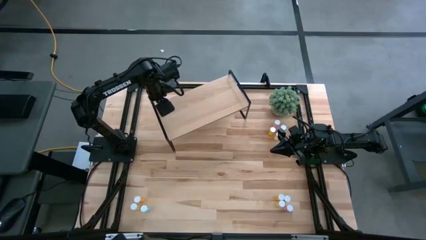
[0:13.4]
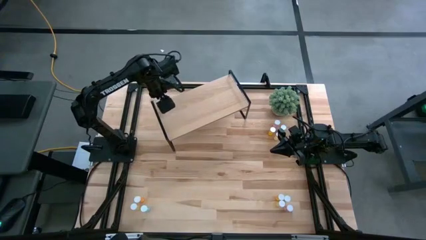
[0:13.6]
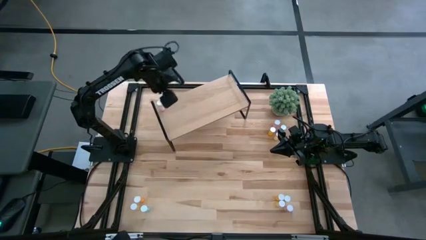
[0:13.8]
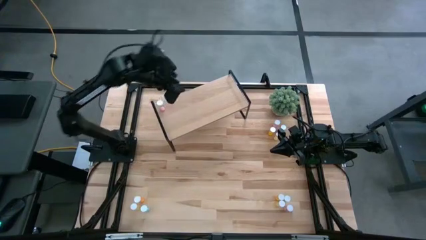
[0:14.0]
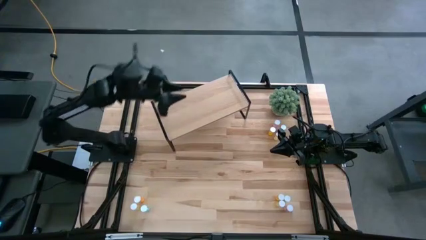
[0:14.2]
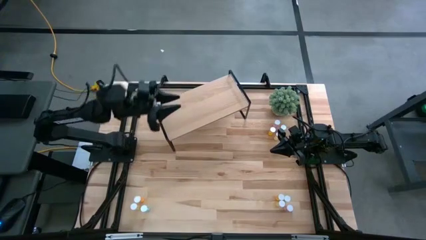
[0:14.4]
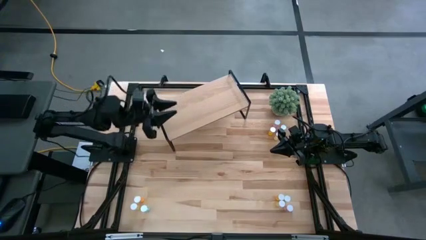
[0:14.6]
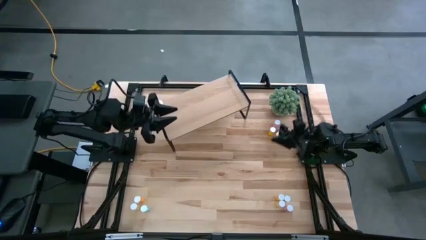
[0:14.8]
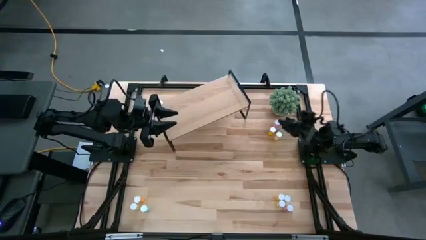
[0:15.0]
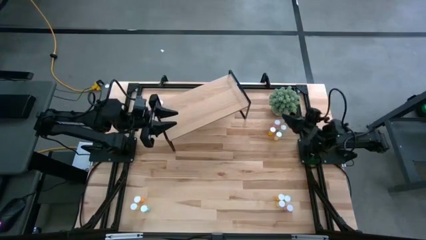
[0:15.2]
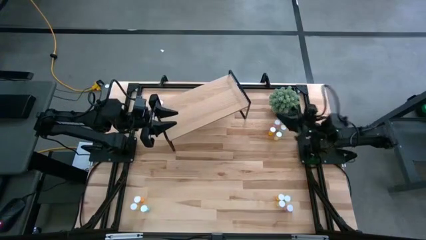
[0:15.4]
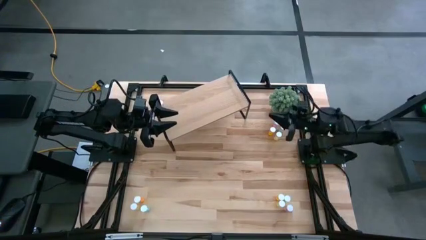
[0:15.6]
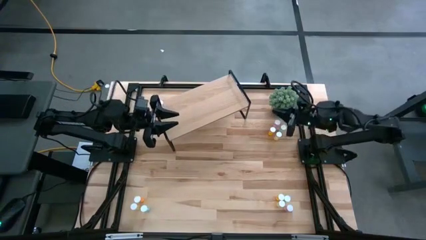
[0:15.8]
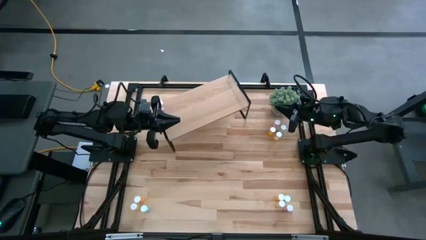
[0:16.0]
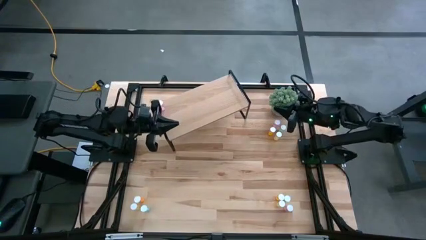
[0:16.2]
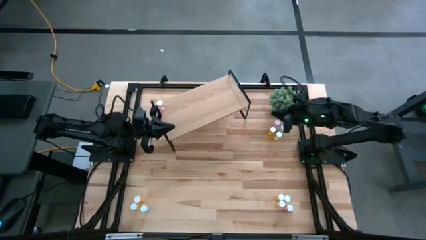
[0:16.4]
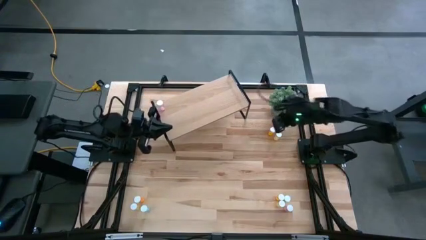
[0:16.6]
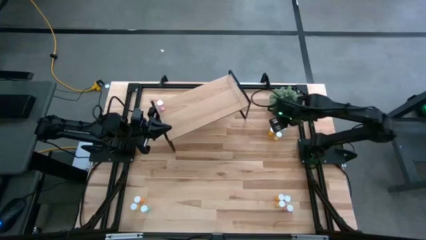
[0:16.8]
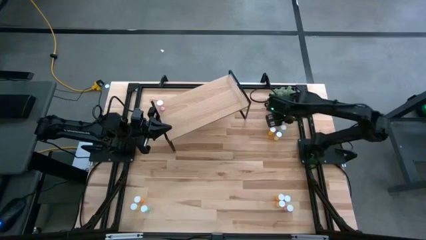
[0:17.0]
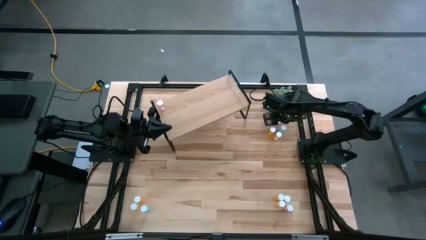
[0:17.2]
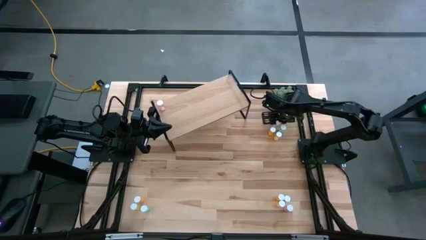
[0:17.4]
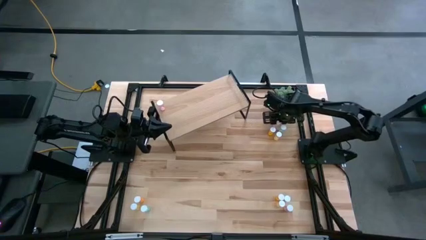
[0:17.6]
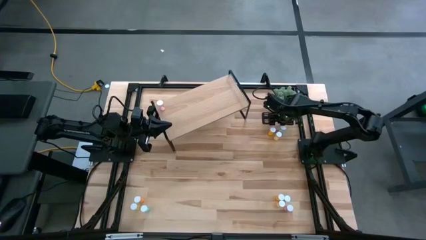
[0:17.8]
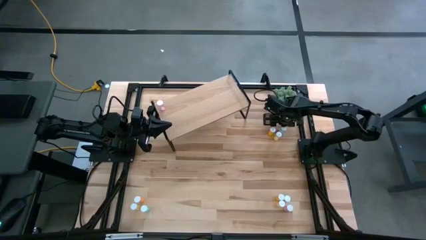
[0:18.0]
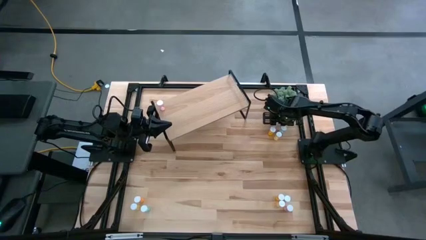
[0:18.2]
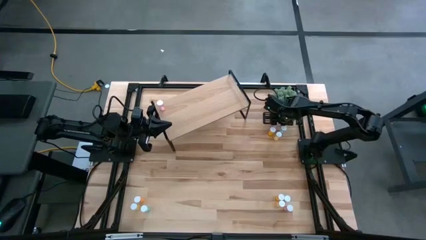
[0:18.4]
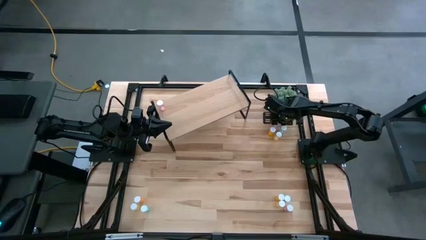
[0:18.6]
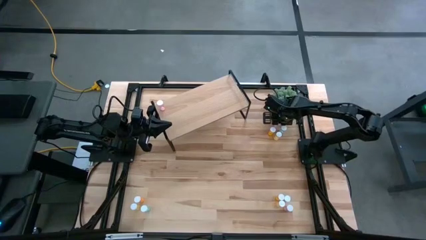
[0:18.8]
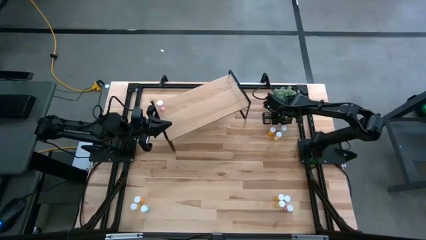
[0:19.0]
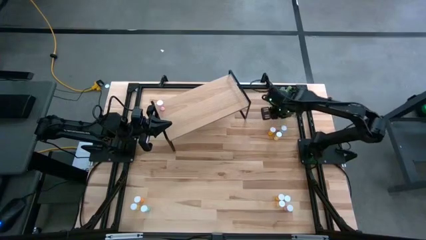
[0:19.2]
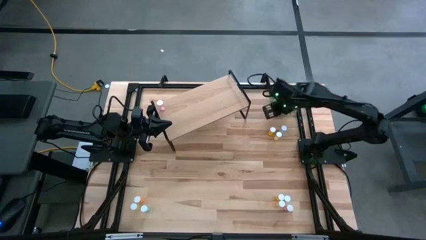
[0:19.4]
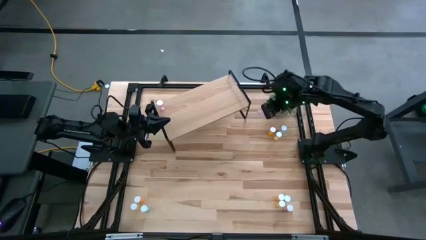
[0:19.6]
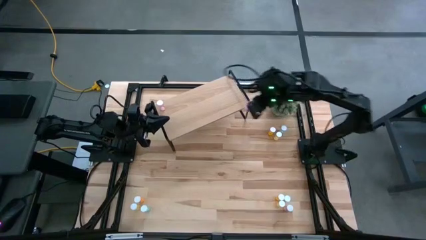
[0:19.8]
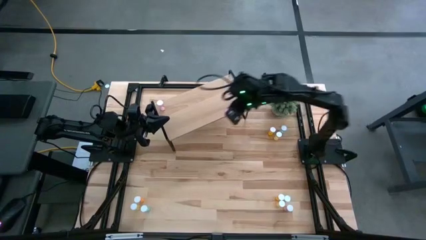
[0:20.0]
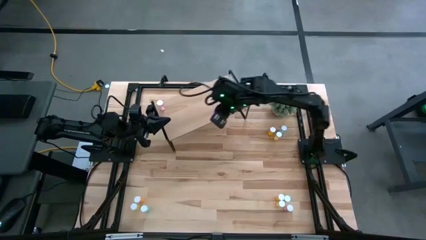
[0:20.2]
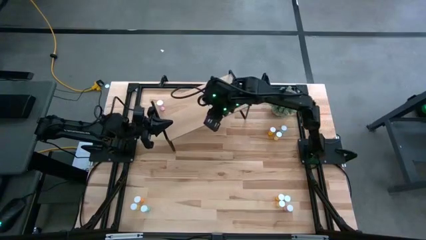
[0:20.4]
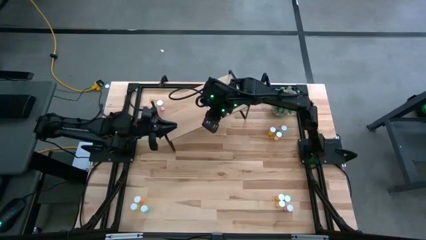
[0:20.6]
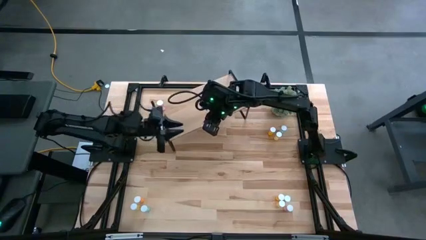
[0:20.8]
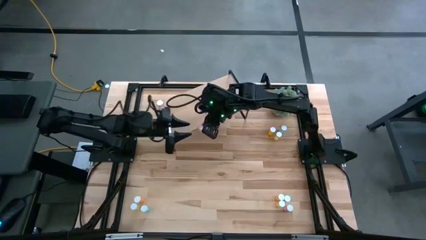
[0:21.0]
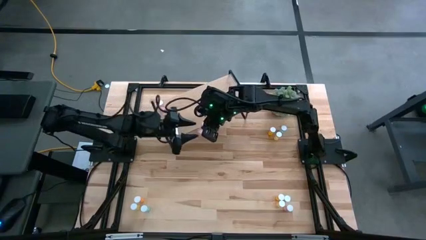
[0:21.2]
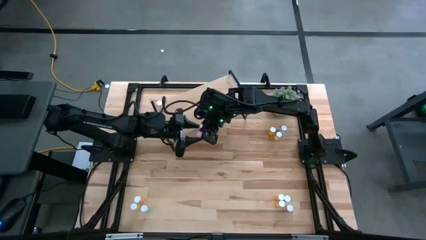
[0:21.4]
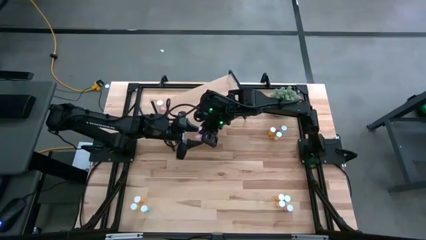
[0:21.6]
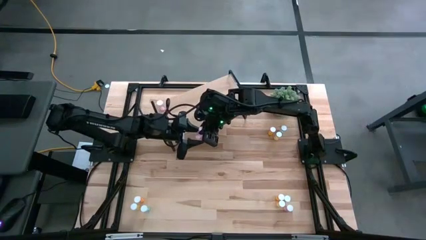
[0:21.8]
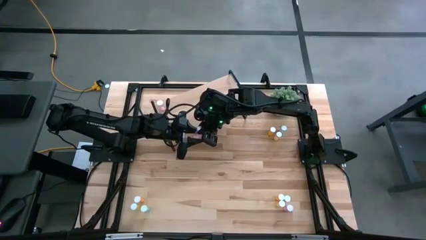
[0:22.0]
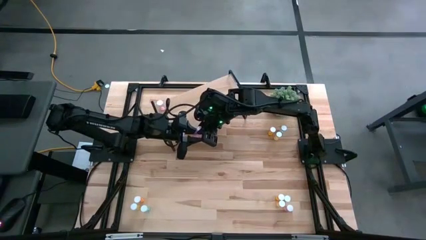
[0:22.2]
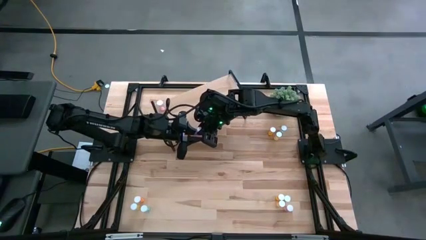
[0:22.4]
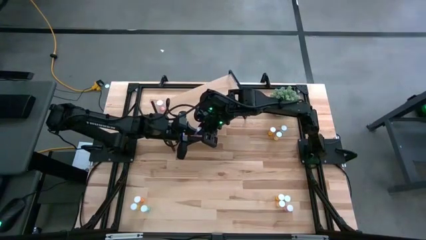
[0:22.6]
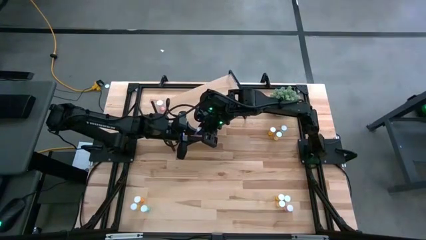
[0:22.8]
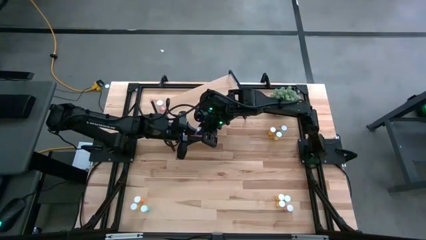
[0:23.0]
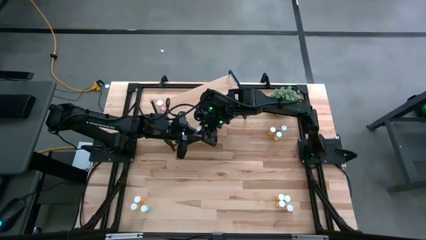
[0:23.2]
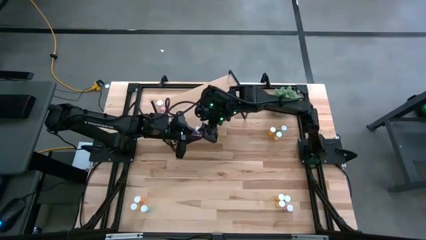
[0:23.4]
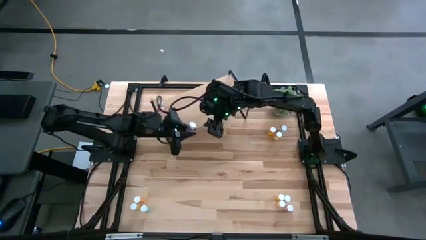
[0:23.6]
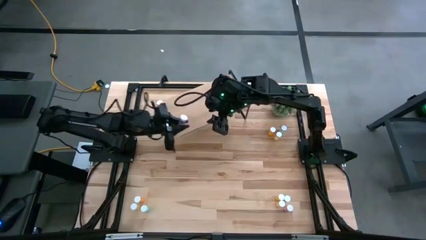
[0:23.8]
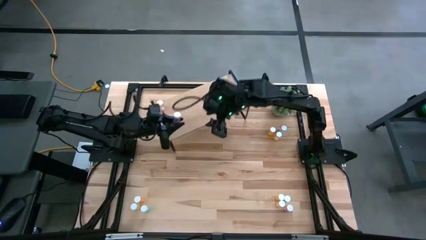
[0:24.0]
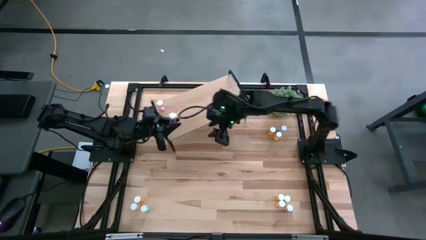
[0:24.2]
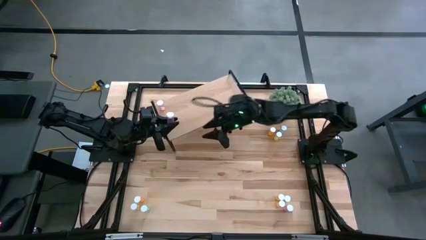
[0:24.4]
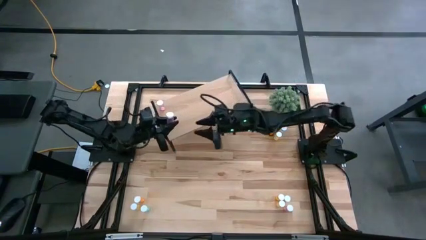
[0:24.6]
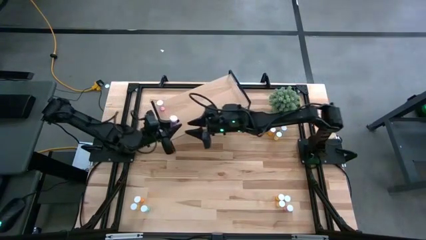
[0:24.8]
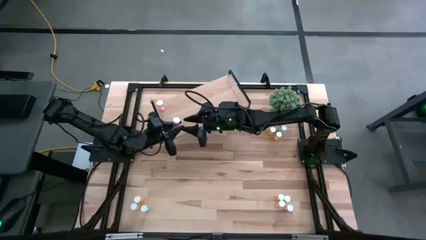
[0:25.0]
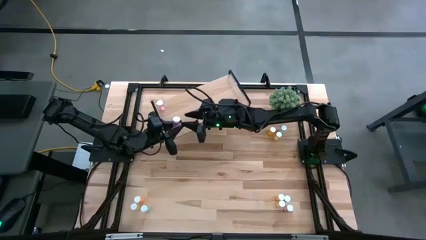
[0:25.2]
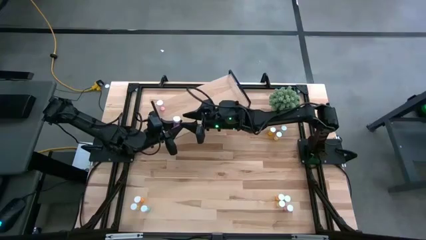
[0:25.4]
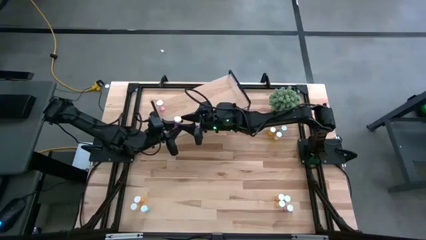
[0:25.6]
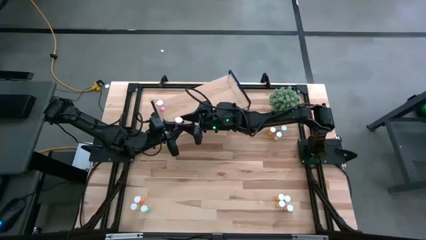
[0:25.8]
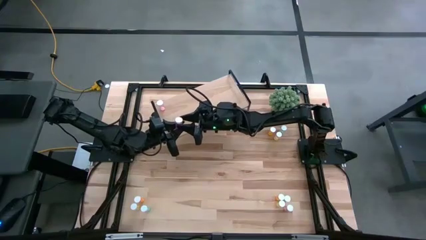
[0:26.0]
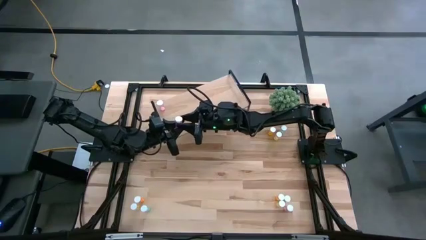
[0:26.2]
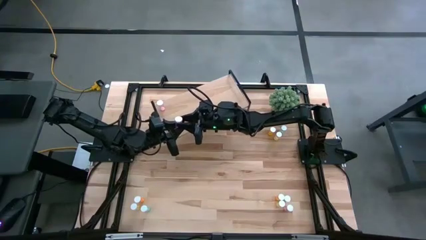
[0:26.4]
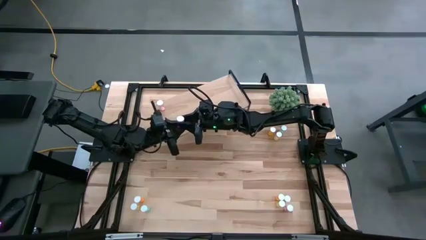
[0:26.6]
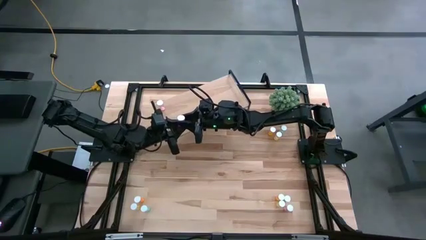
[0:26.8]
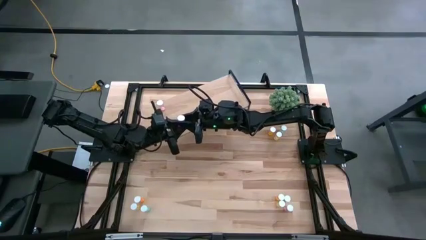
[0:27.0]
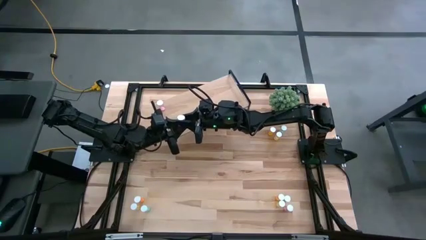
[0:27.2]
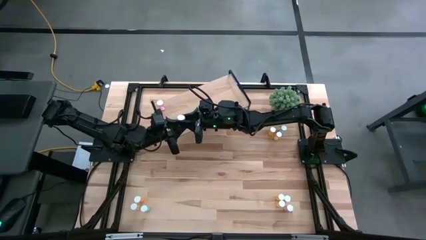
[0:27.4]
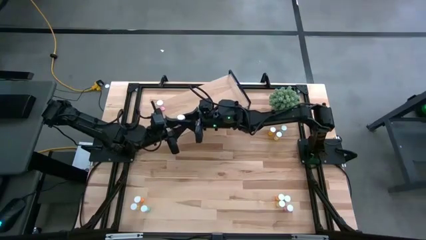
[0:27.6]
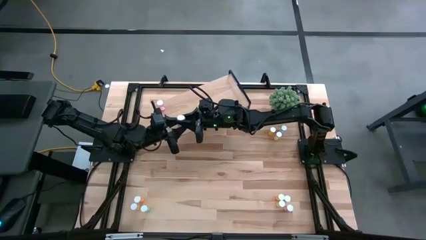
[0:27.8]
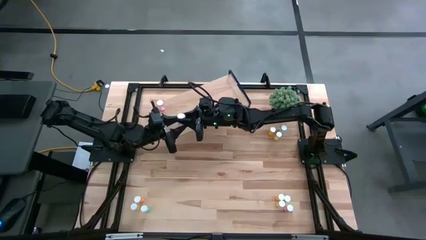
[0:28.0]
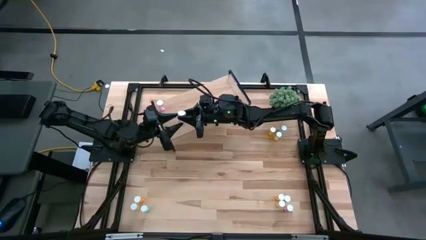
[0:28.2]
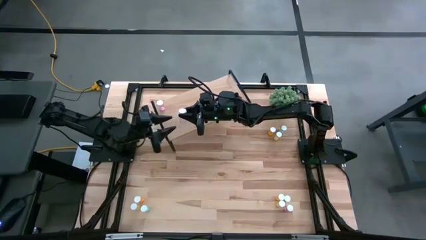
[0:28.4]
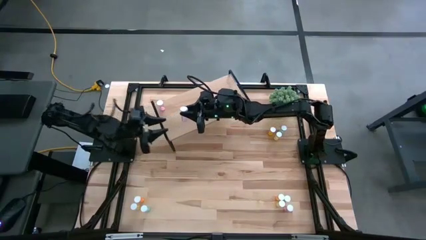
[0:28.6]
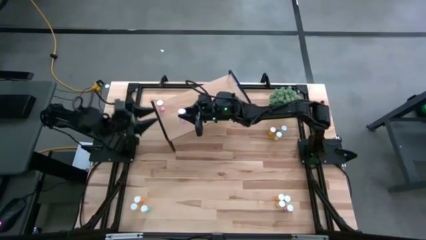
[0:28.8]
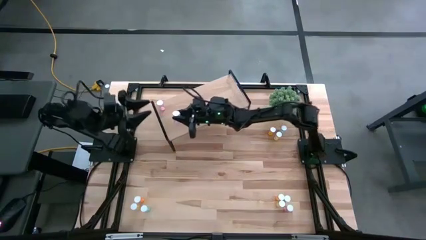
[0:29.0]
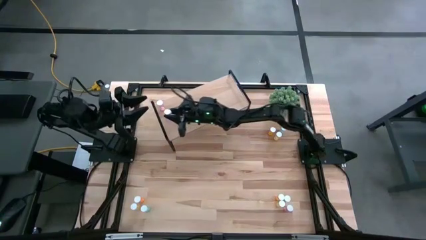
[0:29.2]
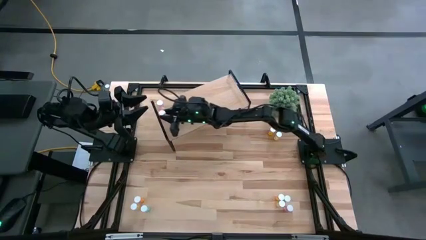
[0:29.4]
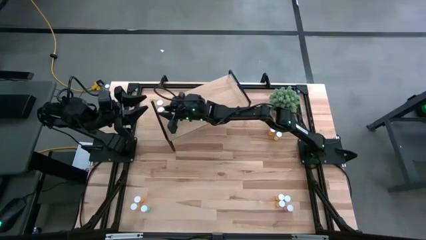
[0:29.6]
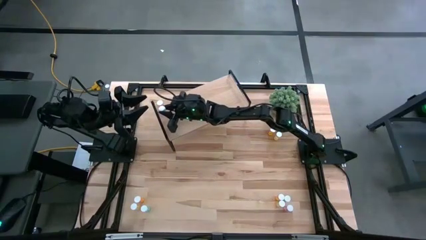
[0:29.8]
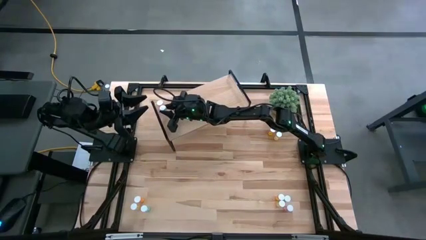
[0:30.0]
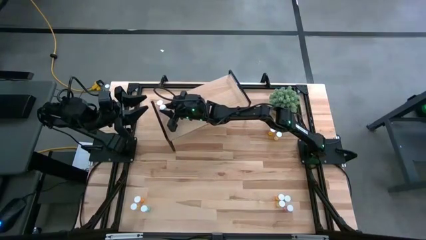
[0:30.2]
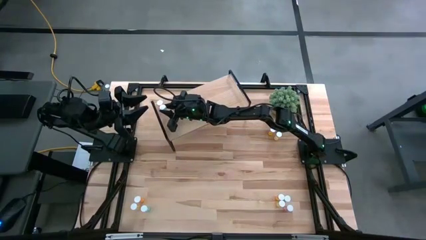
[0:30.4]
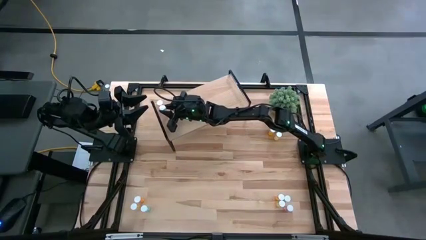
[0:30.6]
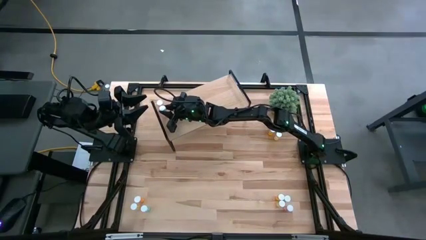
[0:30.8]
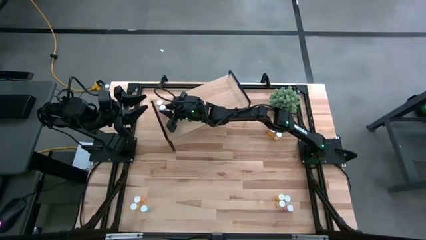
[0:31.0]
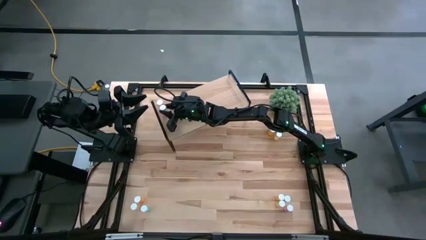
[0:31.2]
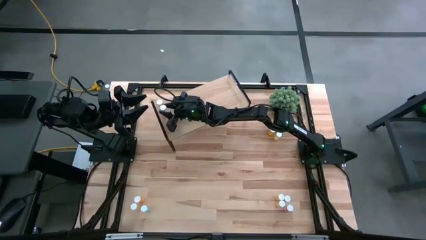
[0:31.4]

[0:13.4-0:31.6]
Task: Pick and place medicine bottles onto shelf by color
Put the top pink pill bottle on the shelf aligned with the other pink pill bottle
